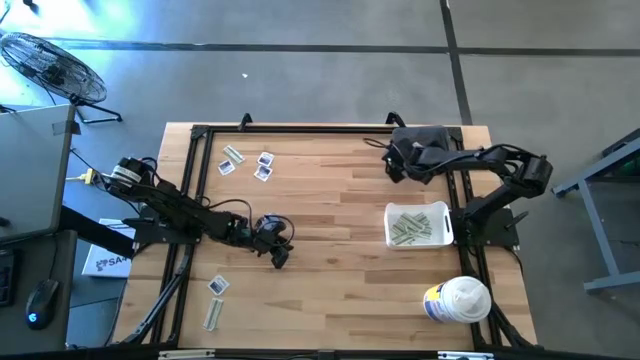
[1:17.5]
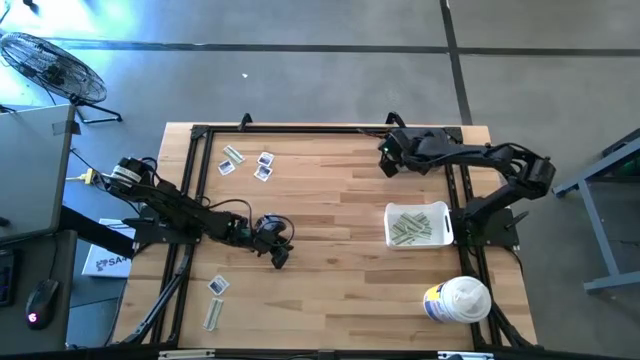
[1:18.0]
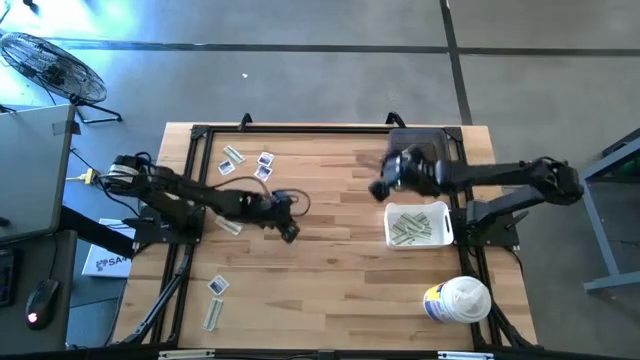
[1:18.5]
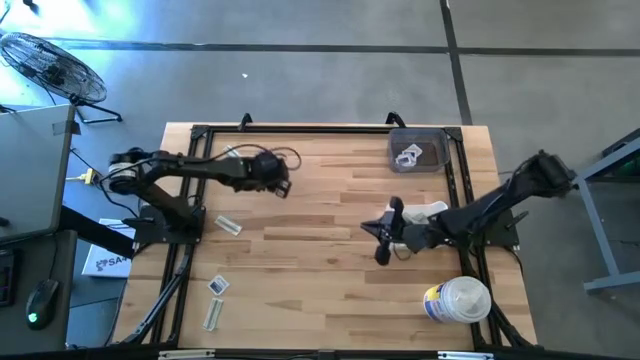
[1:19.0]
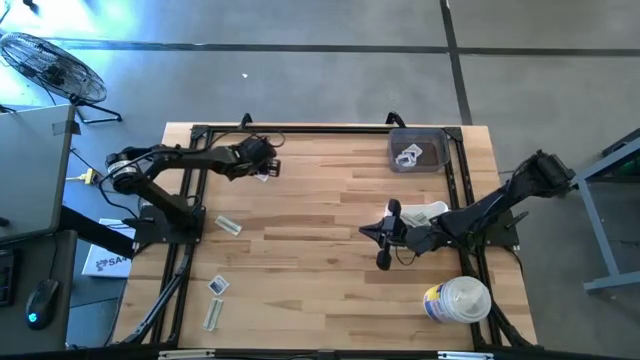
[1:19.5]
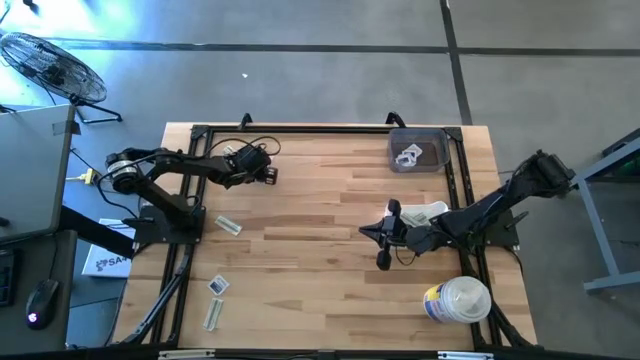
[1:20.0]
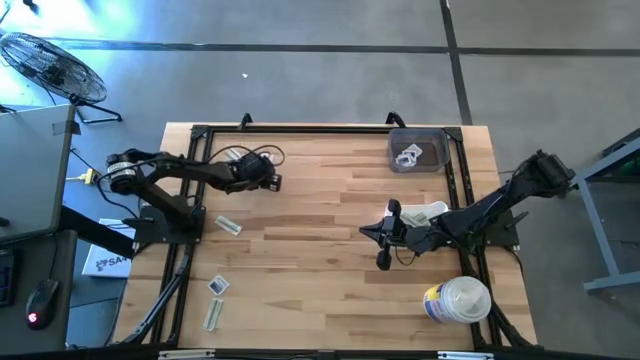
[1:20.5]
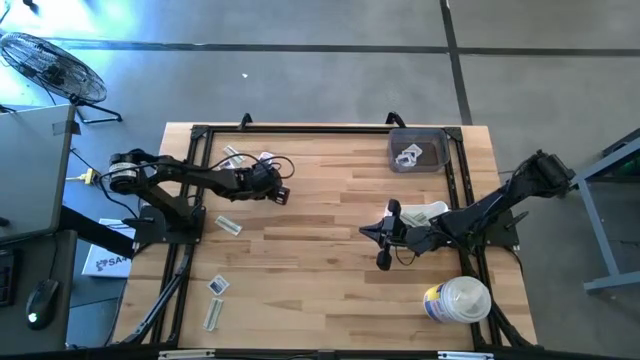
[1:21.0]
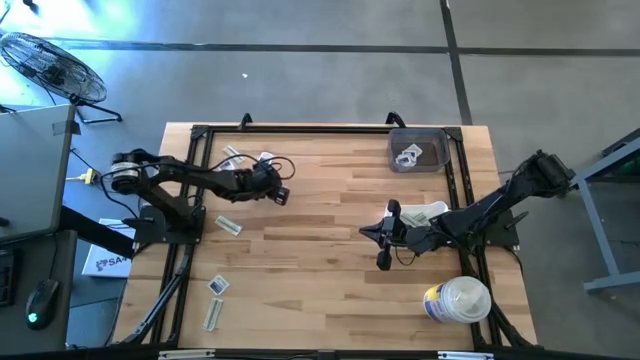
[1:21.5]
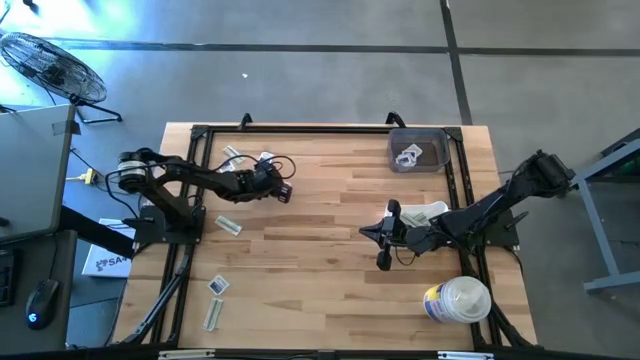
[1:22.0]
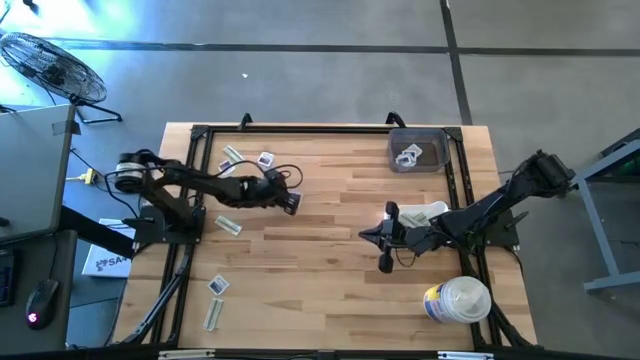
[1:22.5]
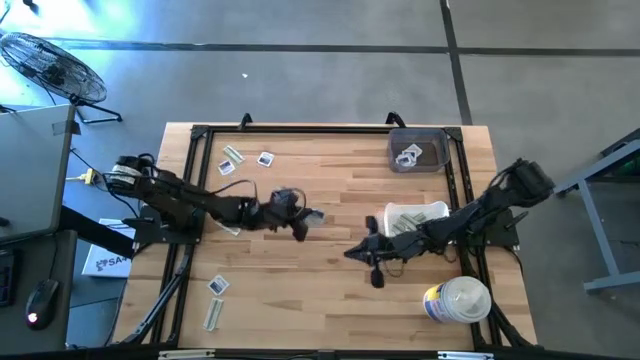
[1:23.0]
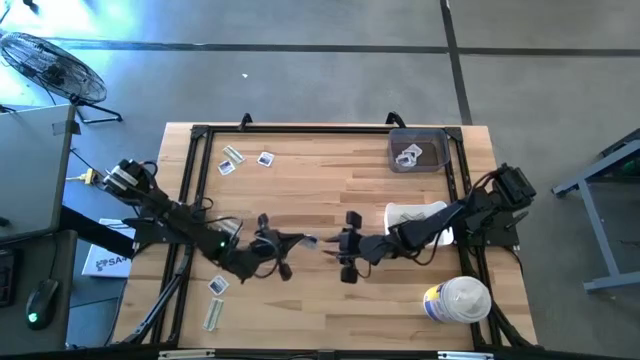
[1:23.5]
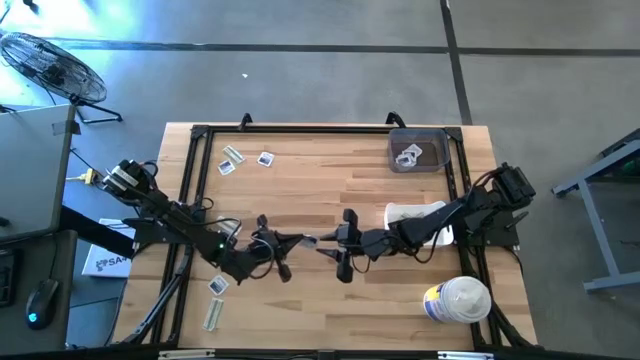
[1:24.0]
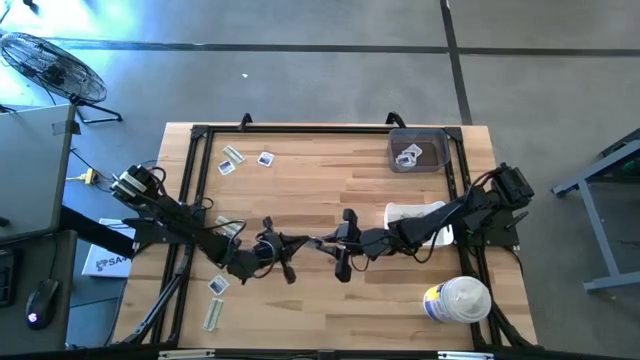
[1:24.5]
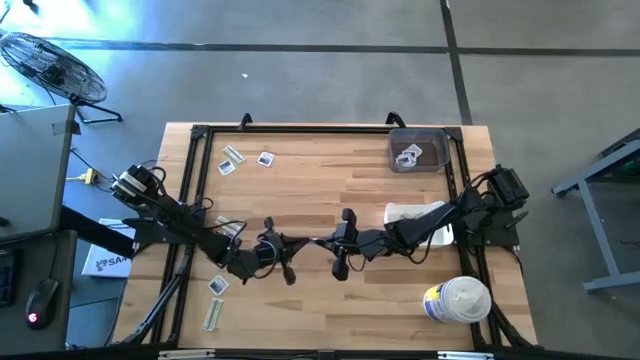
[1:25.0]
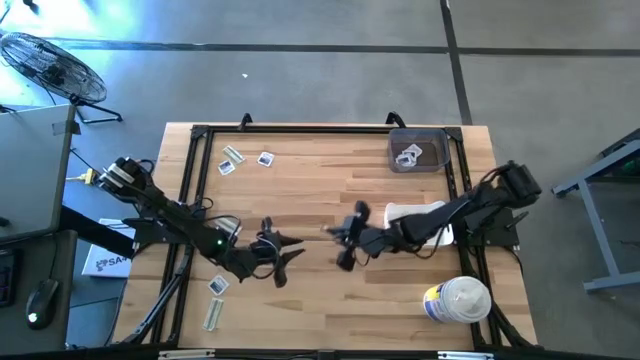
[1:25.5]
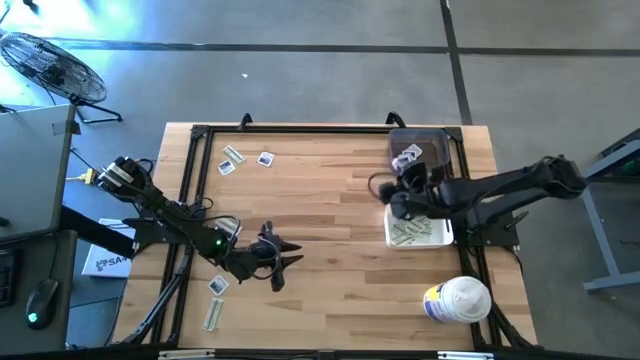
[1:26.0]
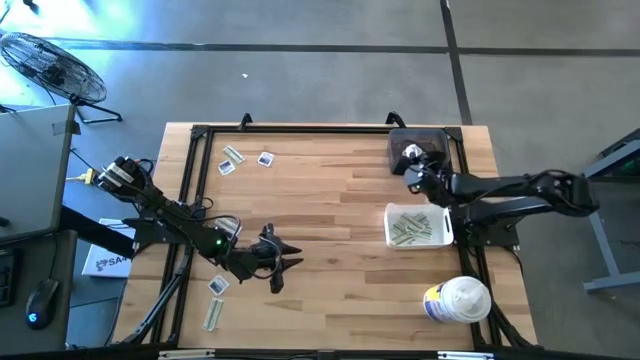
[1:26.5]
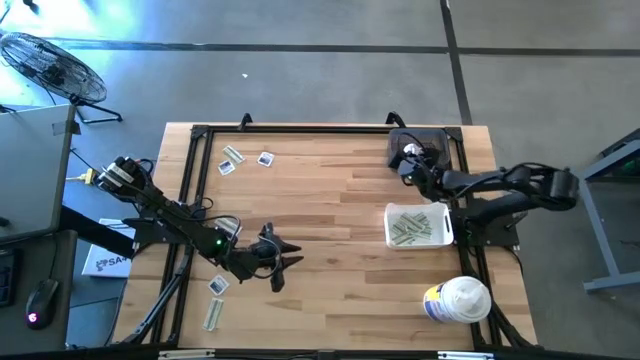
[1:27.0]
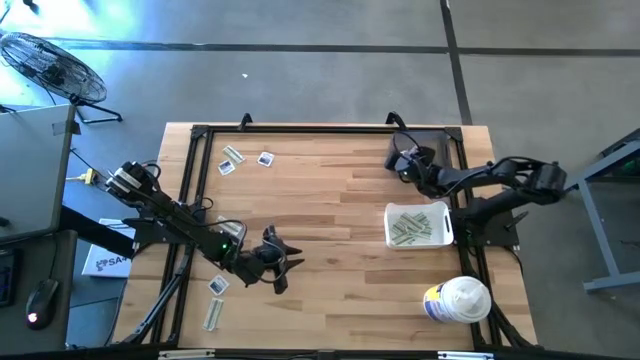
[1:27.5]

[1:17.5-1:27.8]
Task: Pick & Place First Aid Supplies
Put the alcohol pad into the black bin

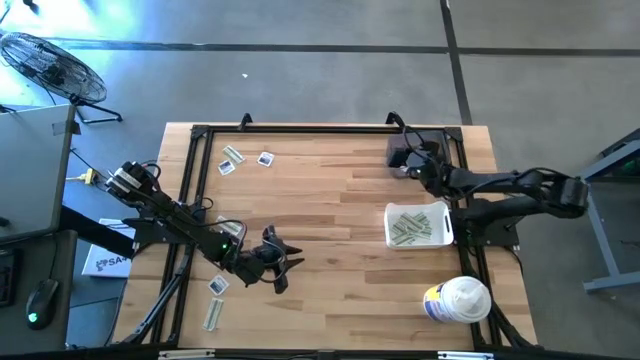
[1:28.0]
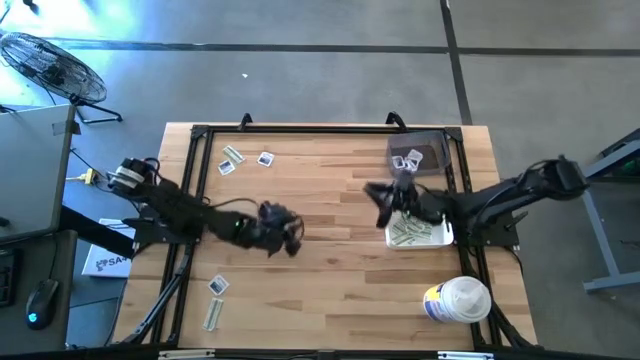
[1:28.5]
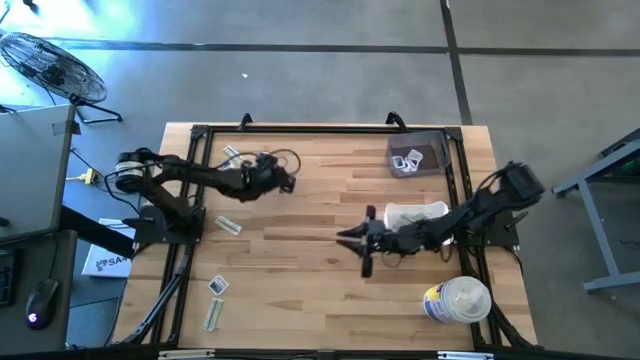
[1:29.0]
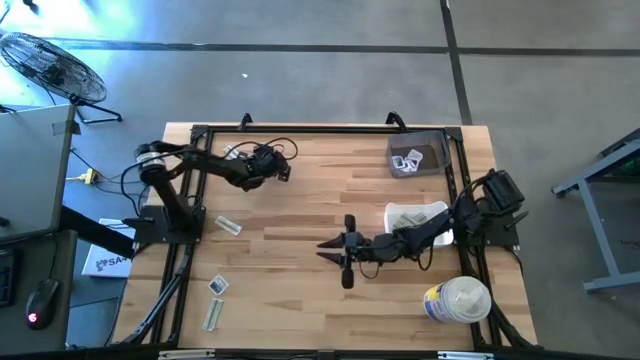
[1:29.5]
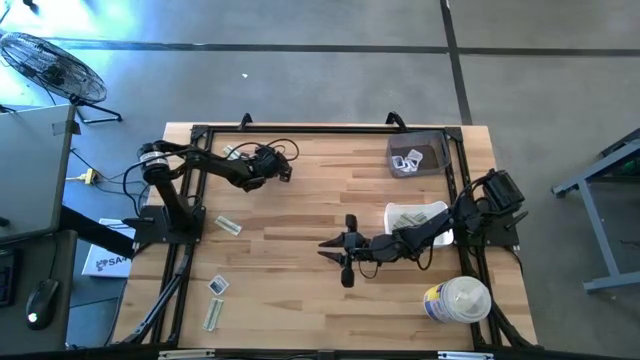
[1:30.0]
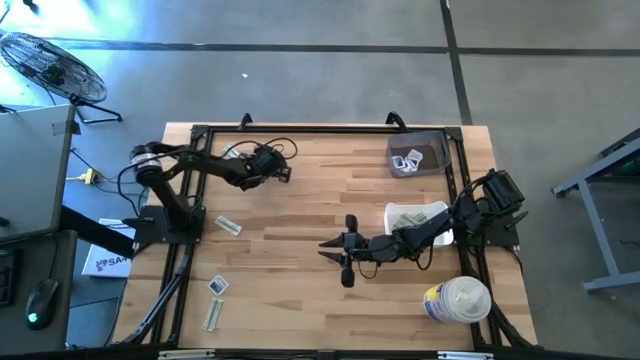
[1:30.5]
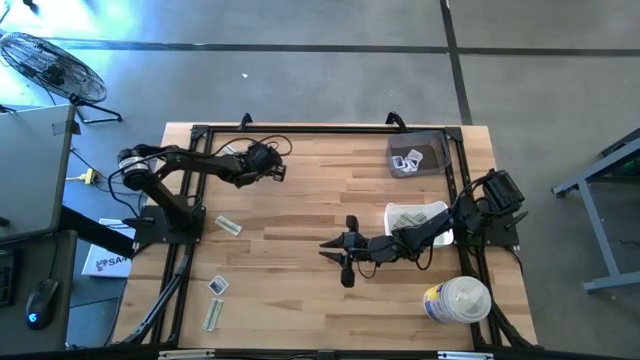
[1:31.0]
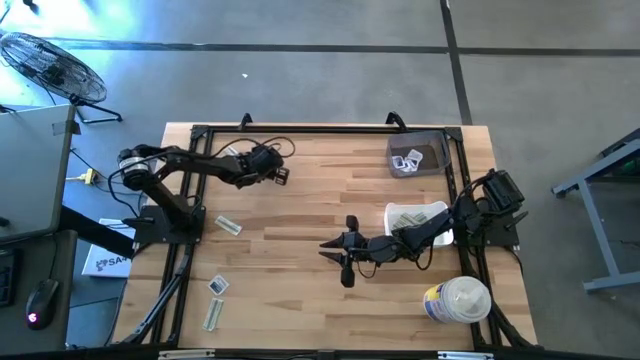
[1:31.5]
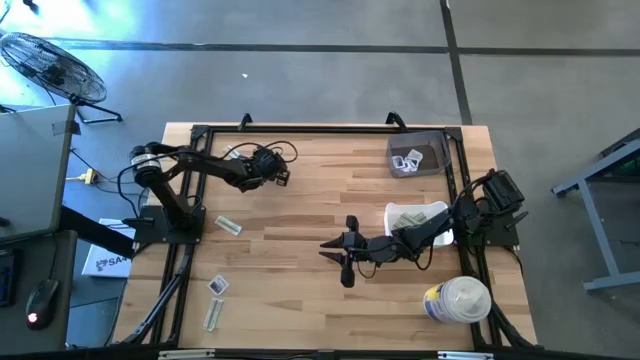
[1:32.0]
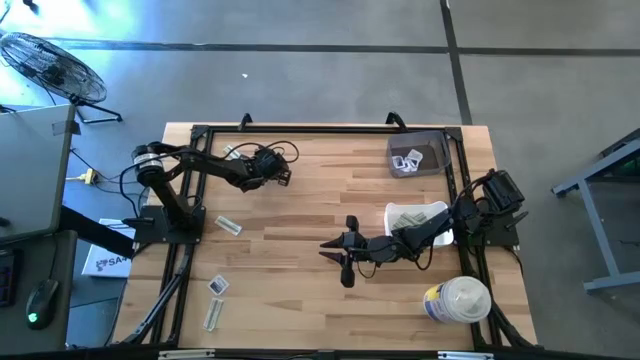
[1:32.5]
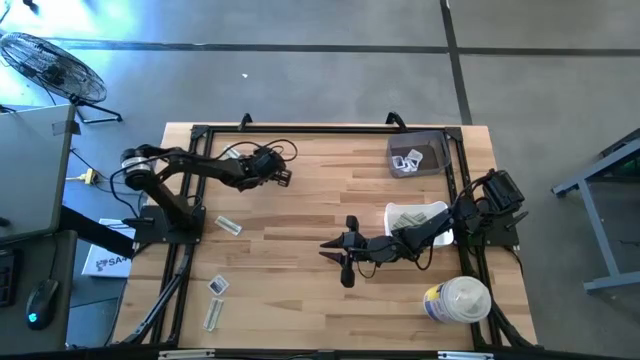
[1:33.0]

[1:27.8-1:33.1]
Put the alcohol pad into the black bin

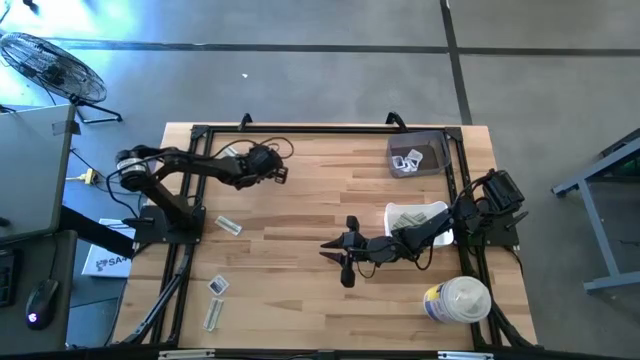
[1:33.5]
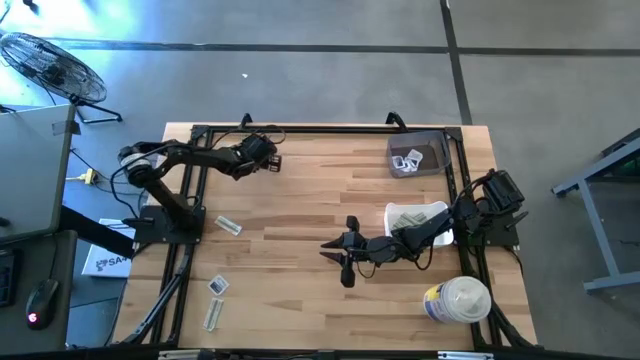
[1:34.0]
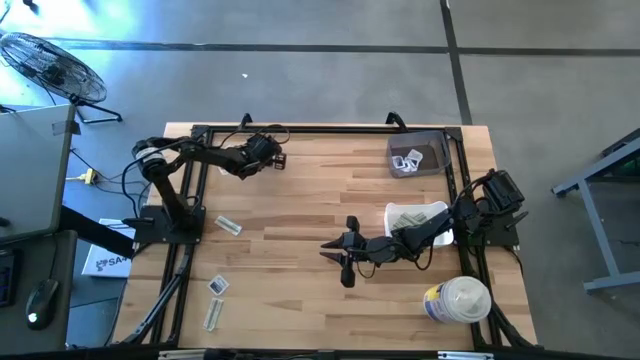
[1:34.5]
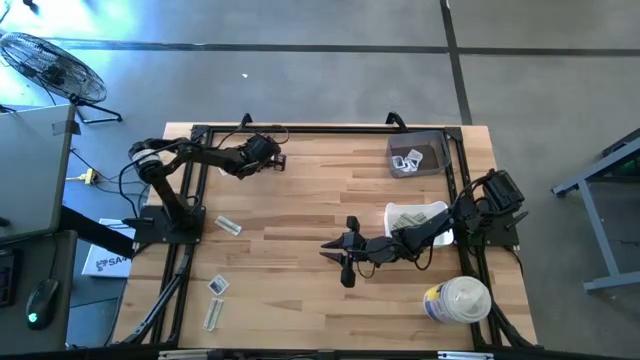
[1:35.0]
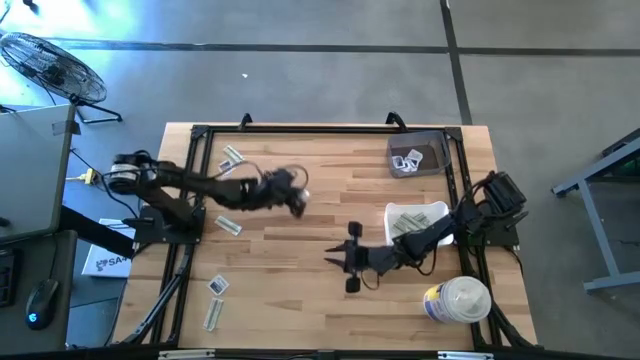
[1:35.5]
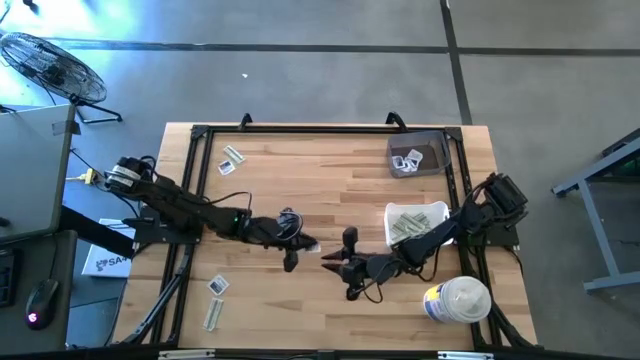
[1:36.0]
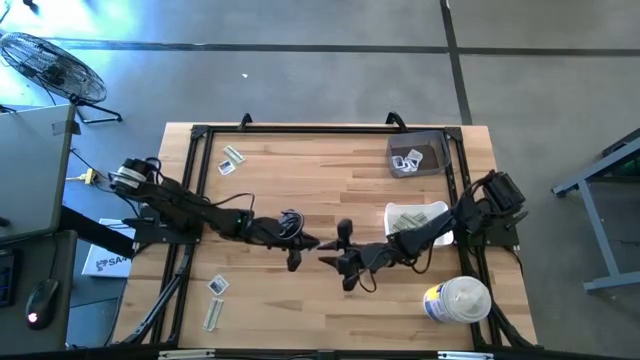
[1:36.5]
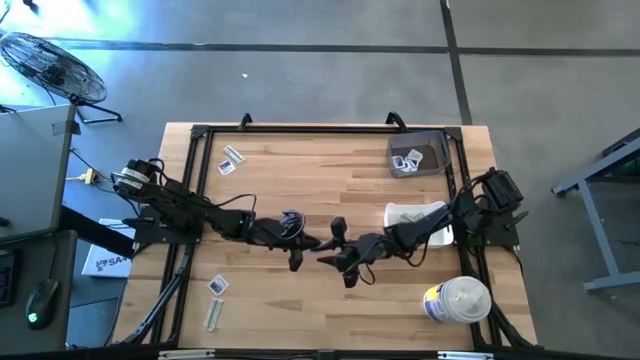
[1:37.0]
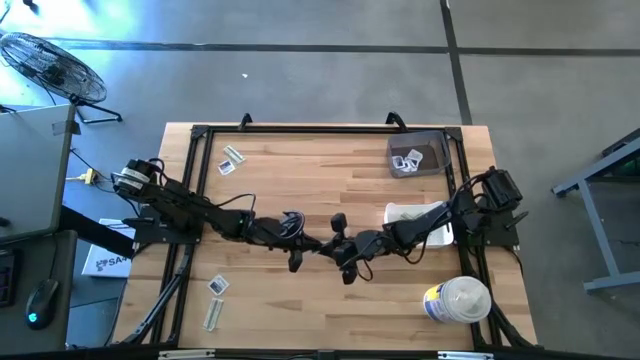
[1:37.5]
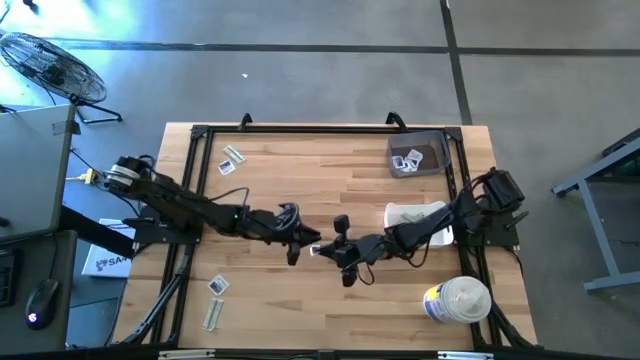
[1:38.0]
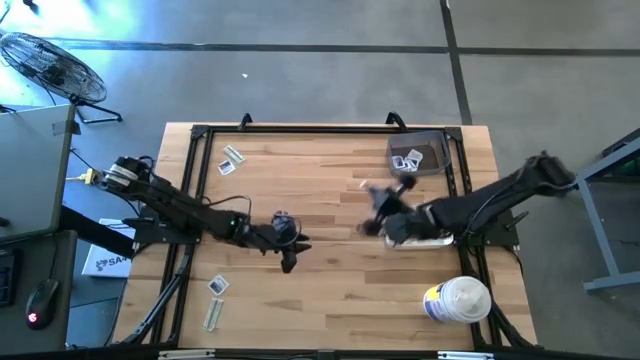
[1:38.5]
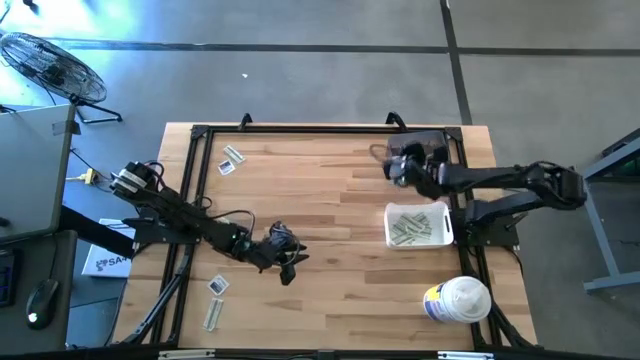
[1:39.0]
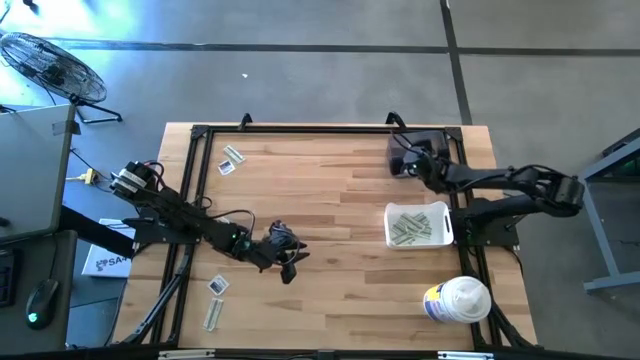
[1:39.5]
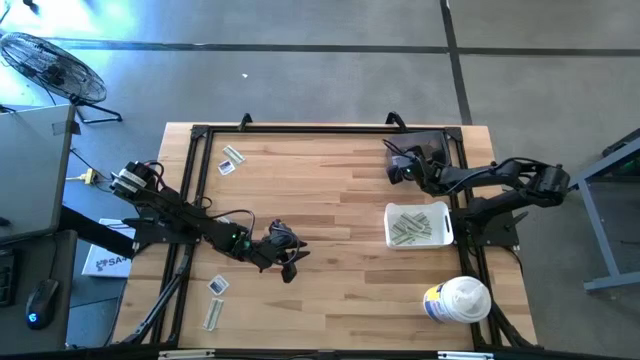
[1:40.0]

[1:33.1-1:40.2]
Put the alcohol pad into the black bin
